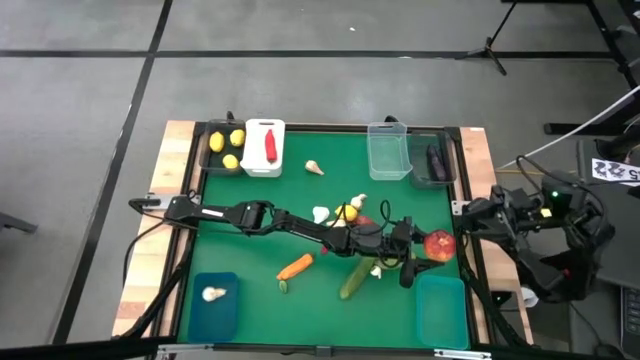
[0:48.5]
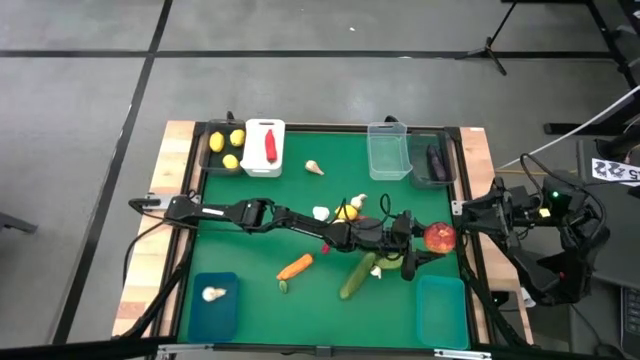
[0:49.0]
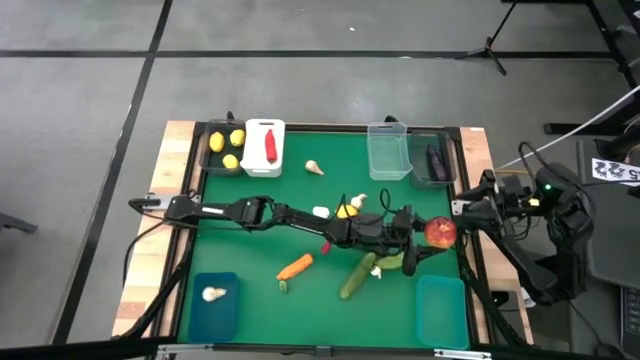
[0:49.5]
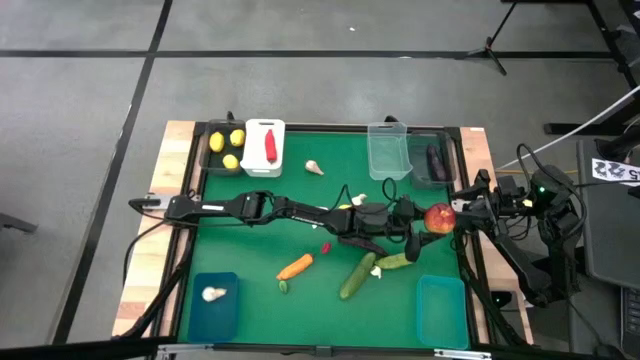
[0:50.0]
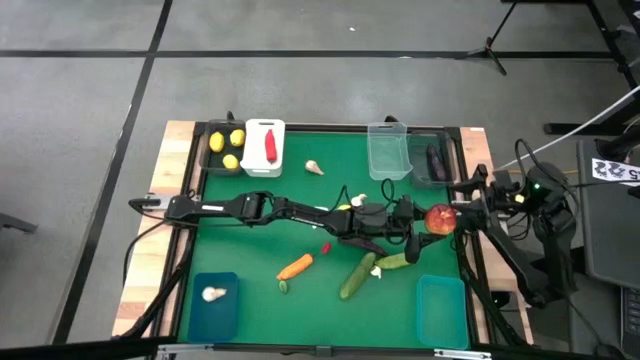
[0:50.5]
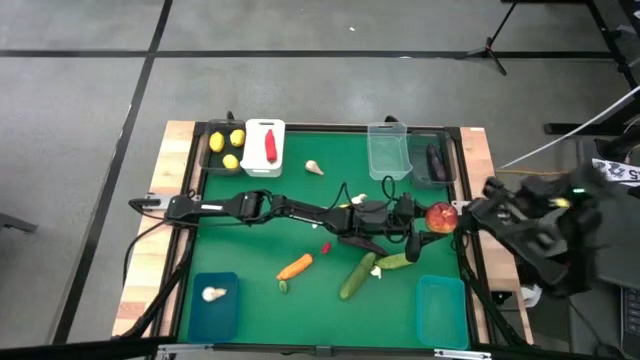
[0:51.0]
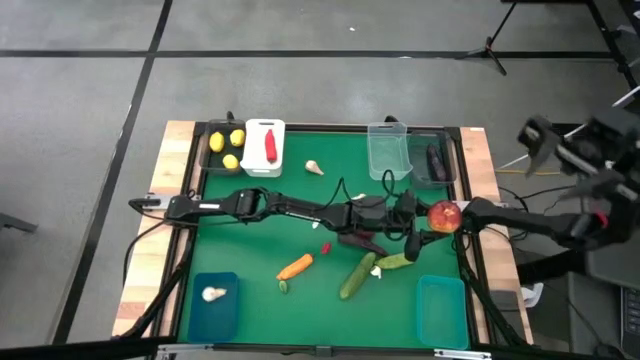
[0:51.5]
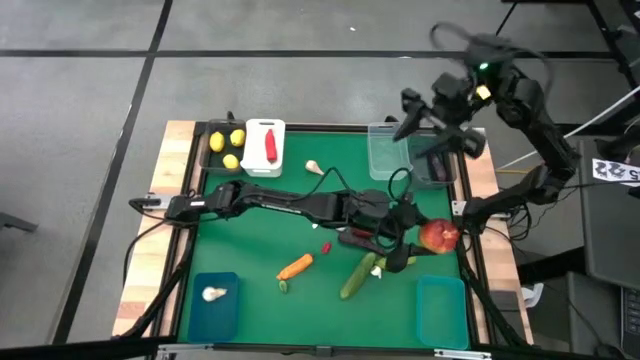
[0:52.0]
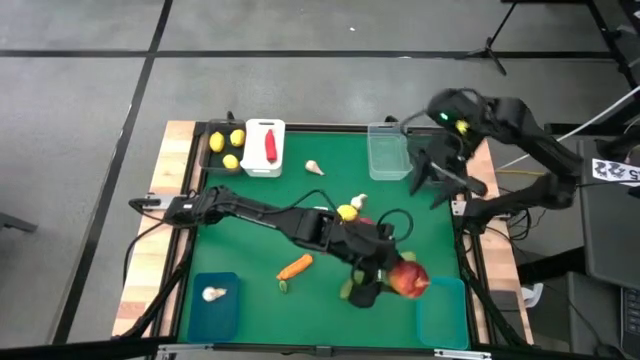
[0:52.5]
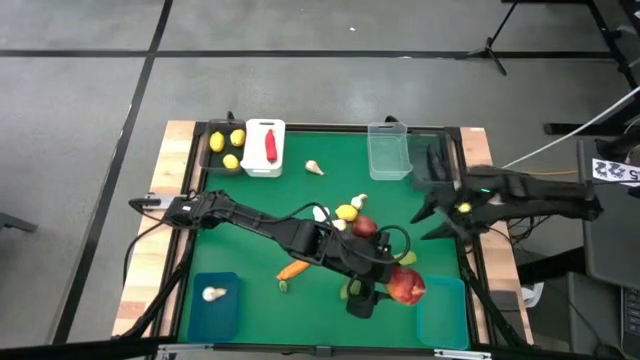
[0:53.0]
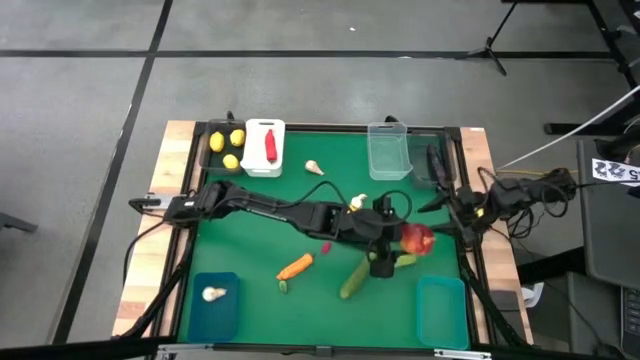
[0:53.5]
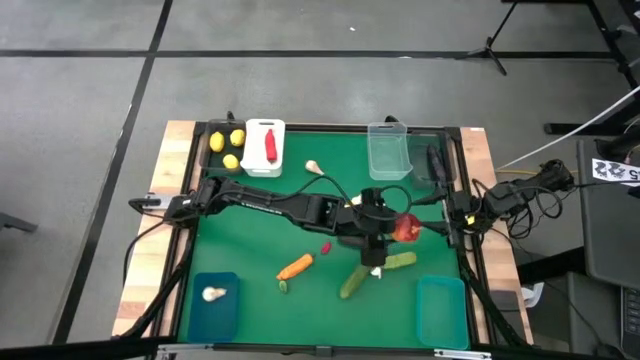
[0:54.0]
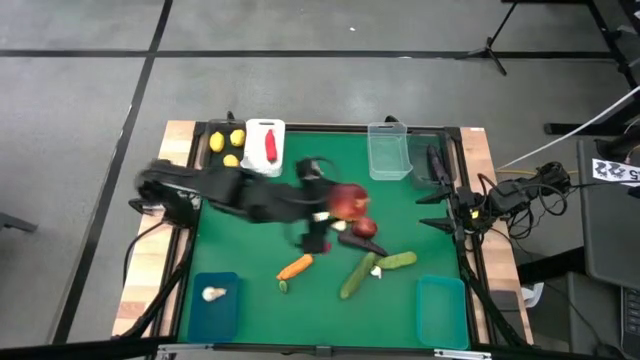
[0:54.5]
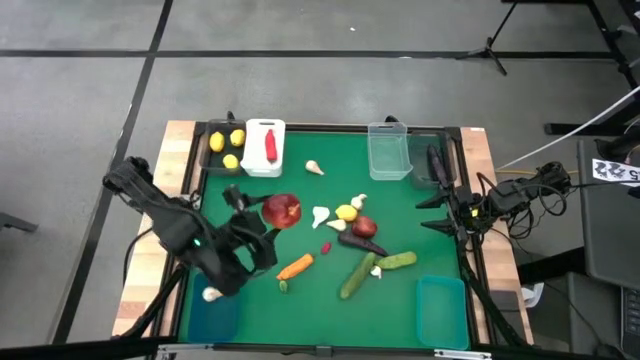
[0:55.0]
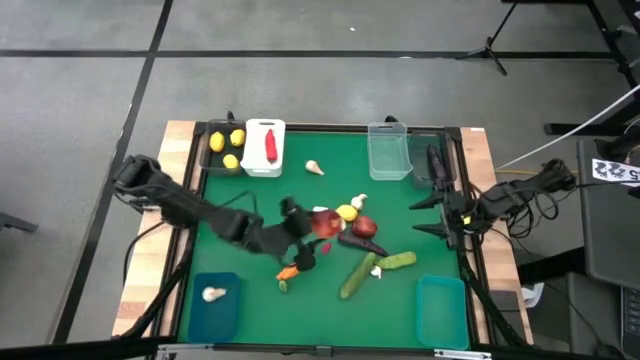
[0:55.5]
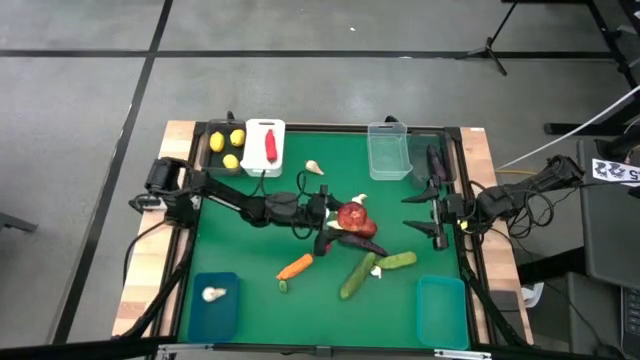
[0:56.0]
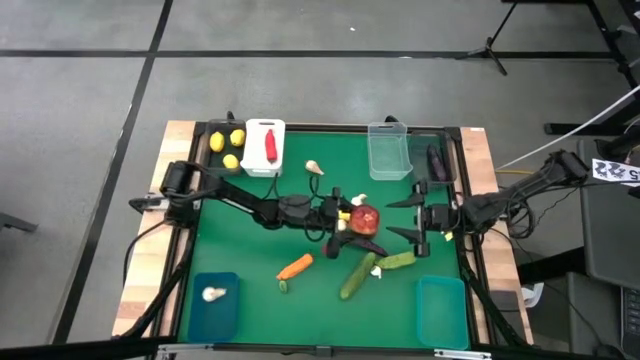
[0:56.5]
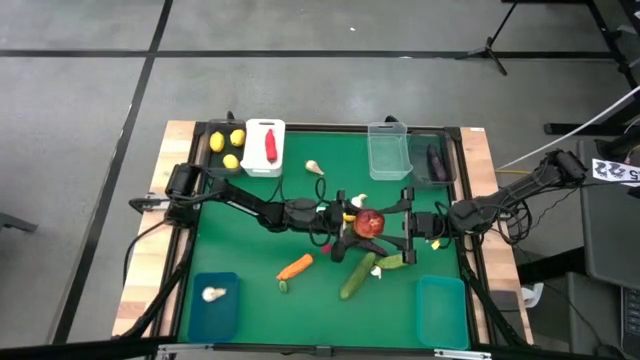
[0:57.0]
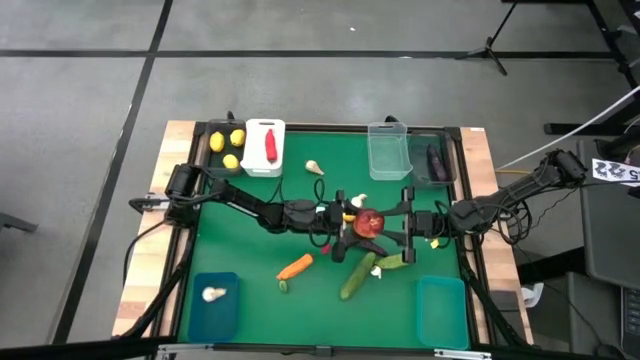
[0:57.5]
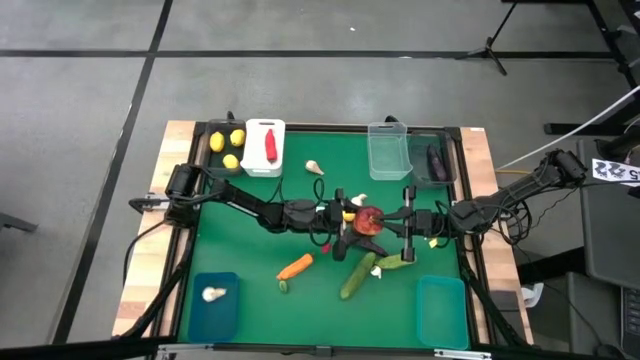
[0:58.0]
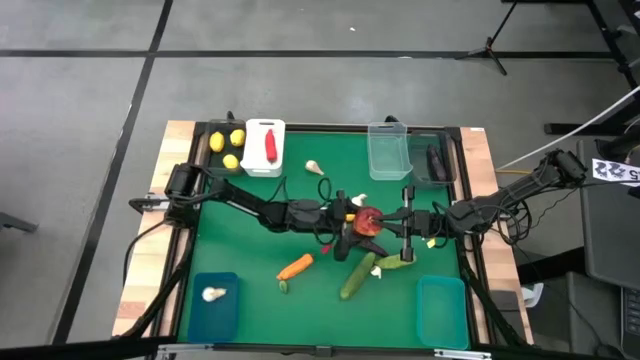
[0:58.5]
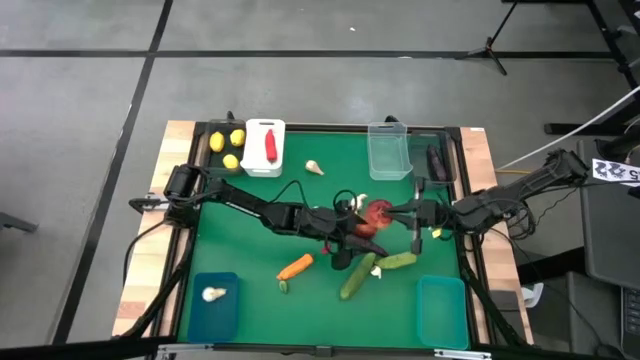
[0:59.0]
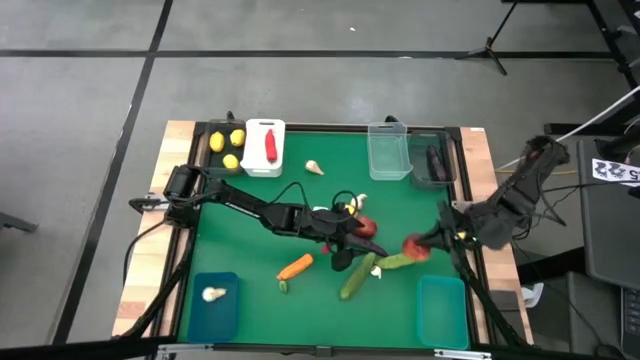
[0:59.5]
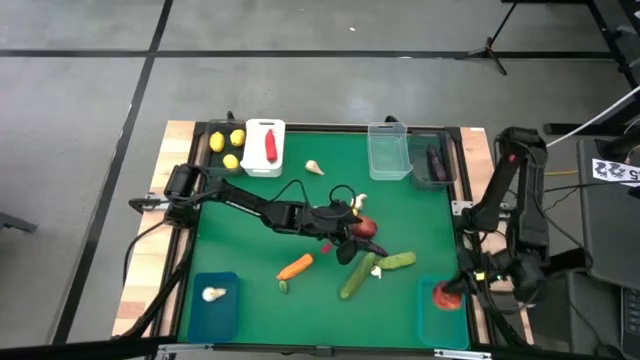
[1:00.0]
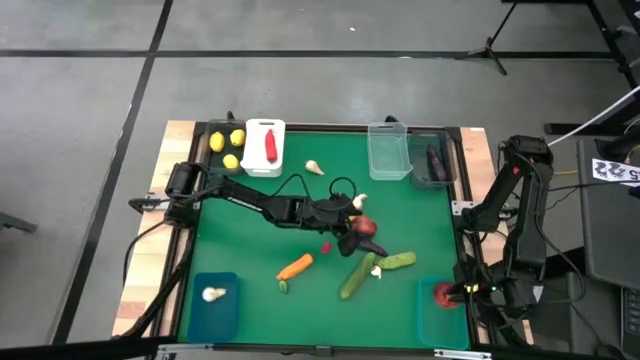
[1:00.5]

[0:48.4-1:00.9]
Task: Sort produce into baskets
Put the apple into the green bin

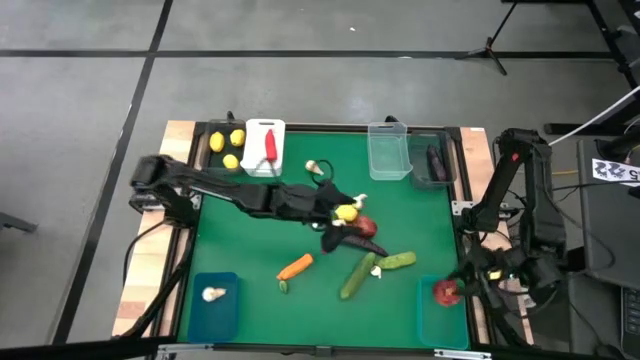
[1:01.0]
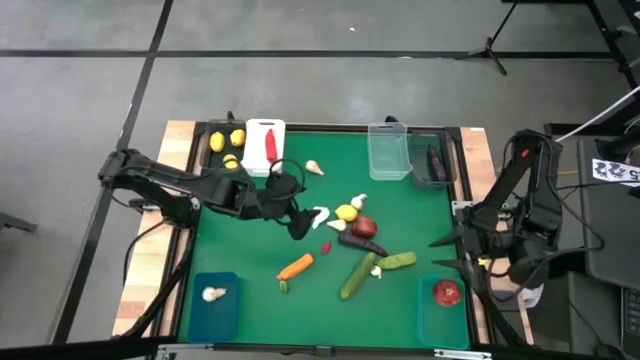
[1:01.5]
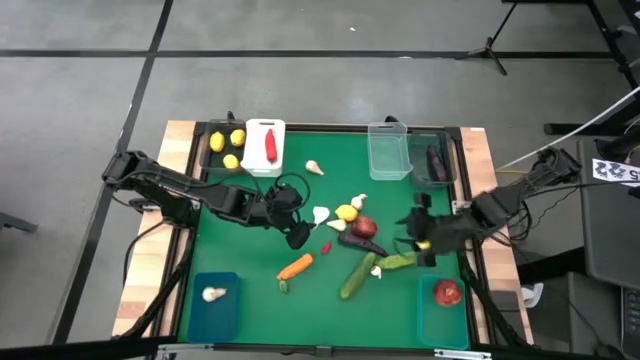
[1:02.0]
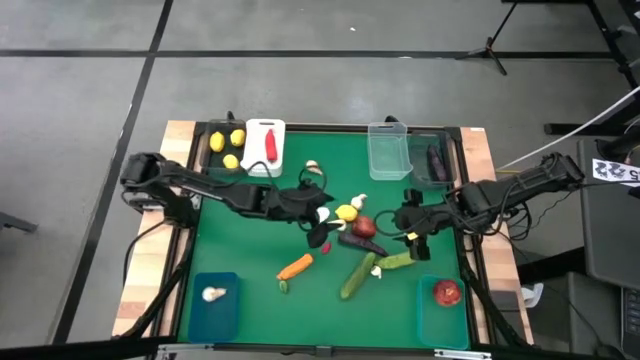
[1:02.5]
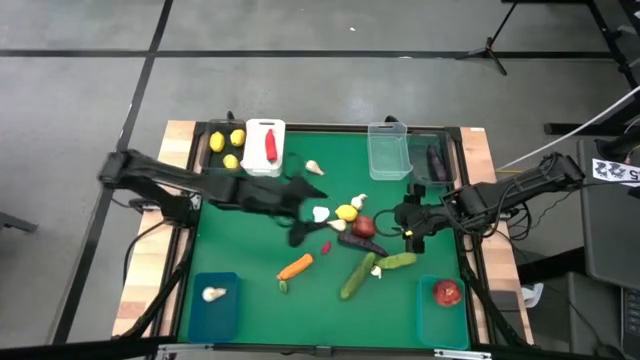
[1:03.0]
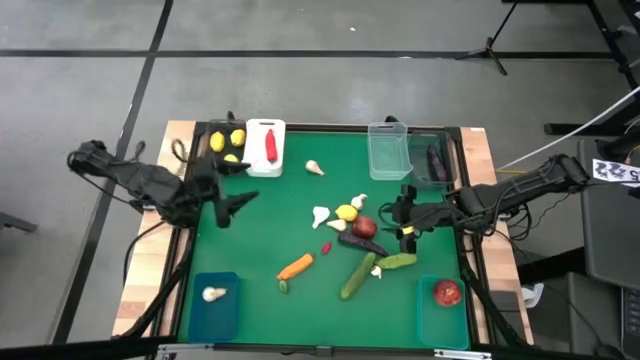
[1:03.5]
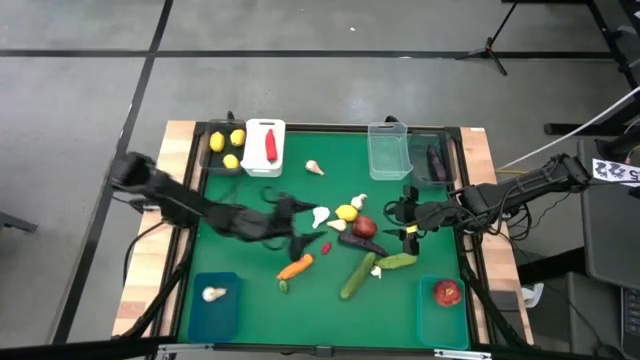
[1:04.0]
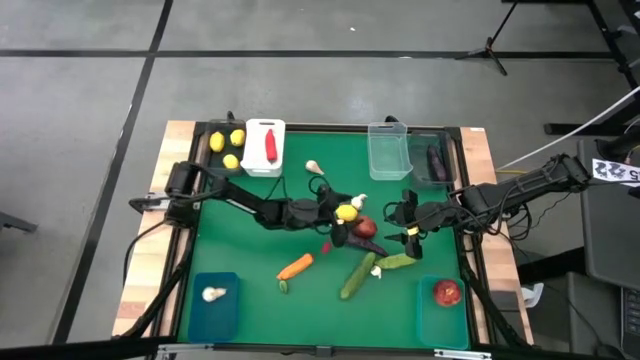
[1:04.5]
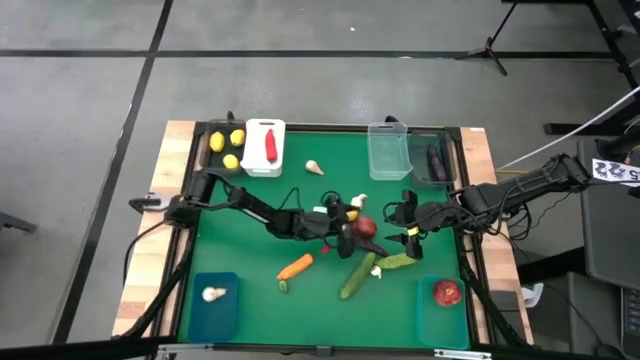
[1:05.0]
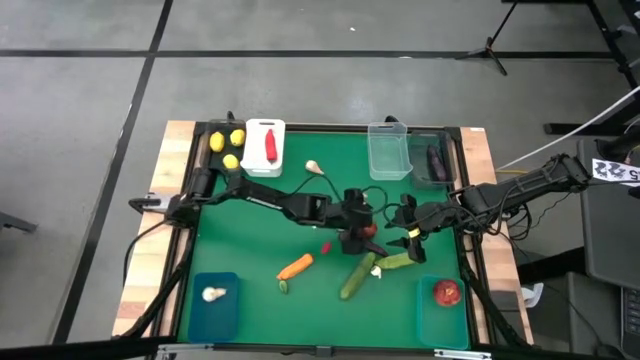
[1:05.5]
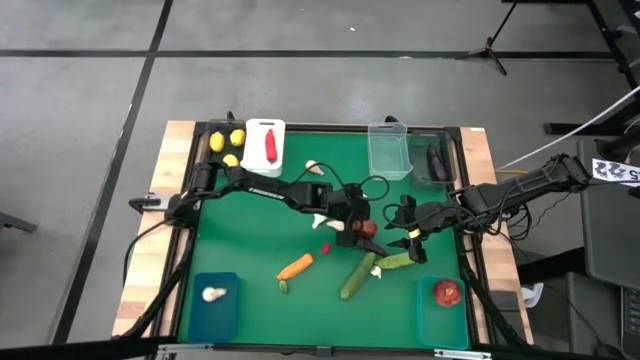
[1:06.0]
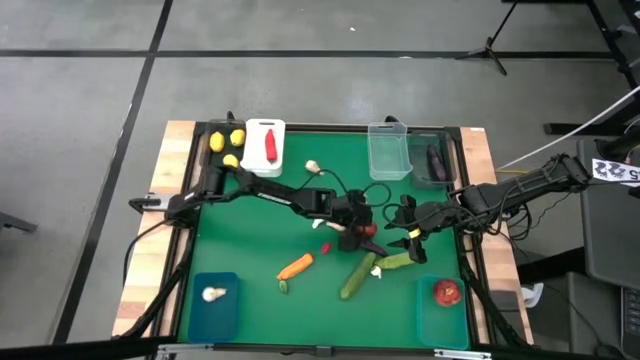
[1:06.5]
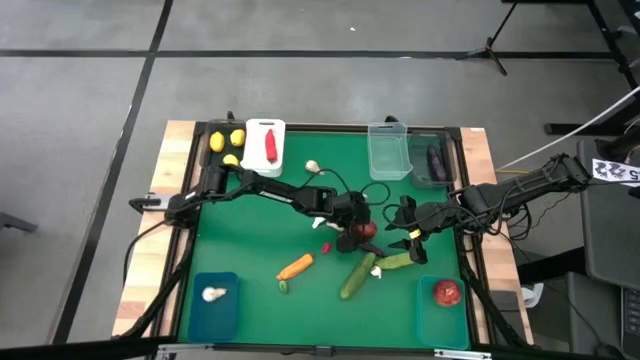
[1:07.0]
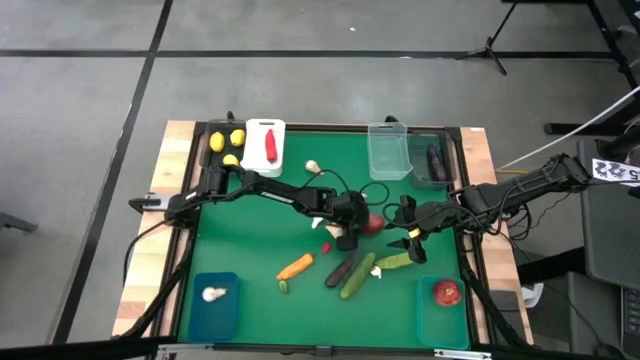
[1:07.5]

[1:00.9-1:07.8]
Put the apple into the green bin
